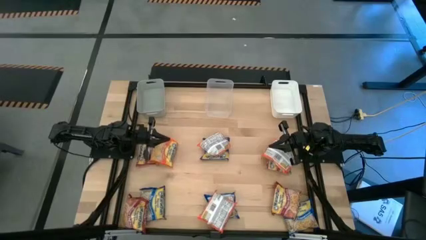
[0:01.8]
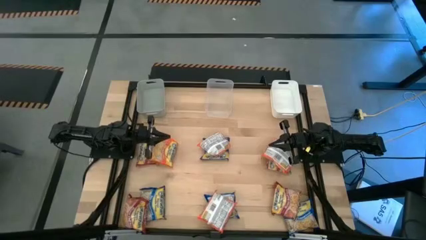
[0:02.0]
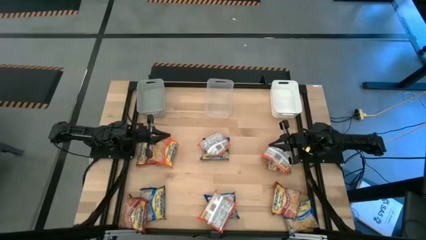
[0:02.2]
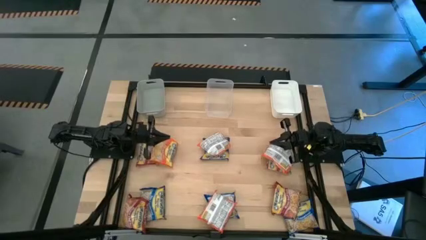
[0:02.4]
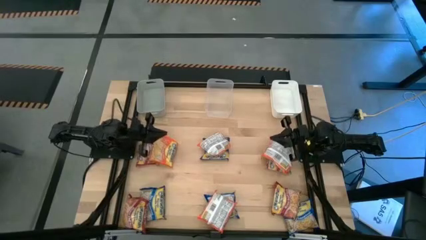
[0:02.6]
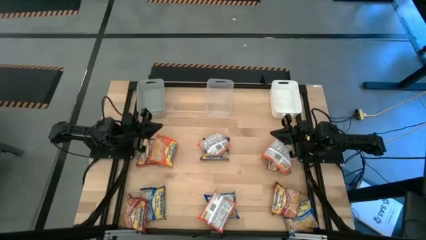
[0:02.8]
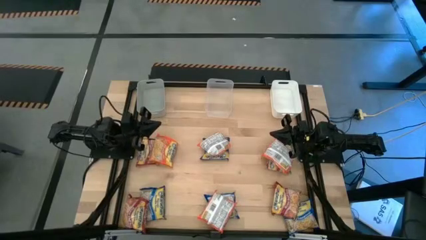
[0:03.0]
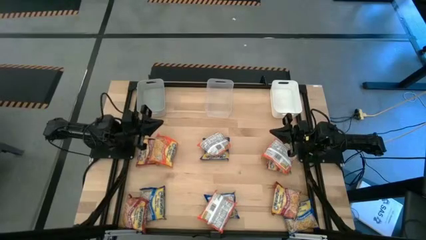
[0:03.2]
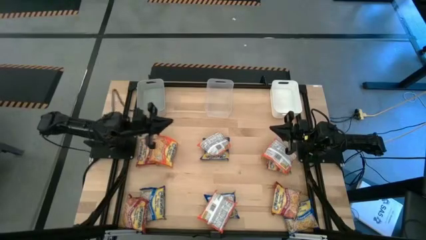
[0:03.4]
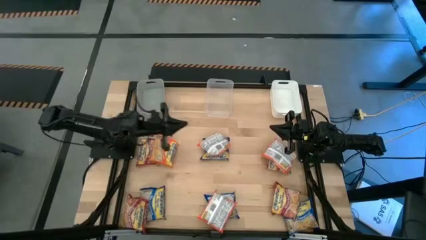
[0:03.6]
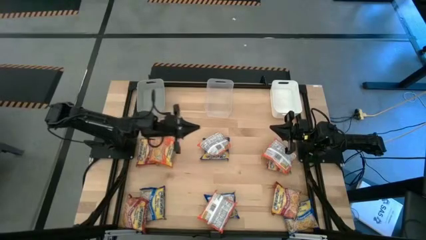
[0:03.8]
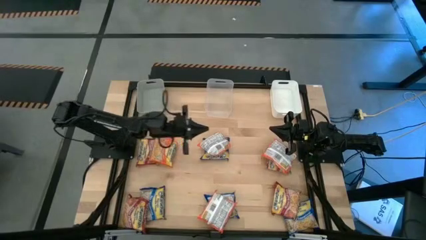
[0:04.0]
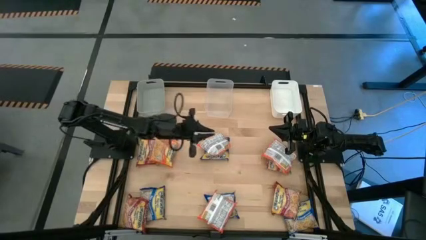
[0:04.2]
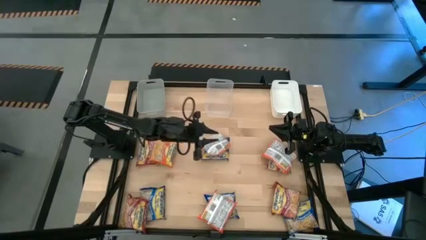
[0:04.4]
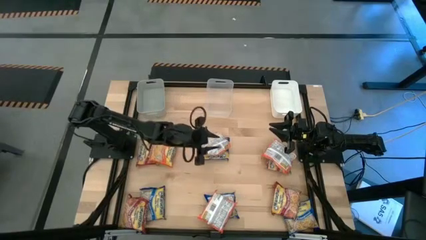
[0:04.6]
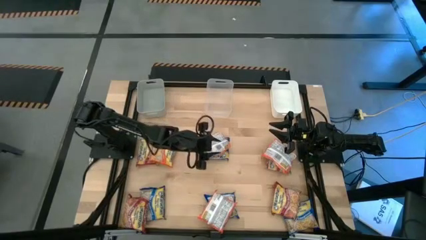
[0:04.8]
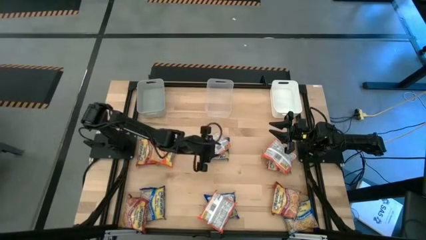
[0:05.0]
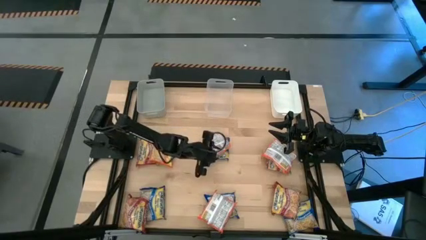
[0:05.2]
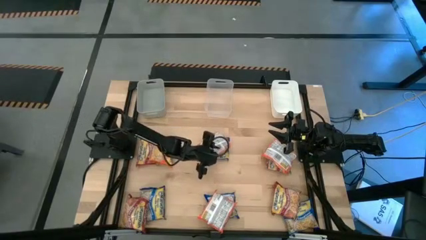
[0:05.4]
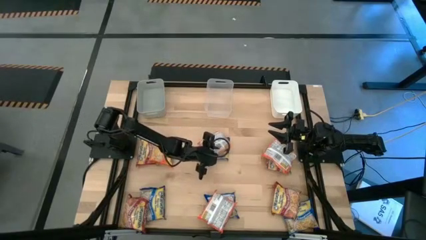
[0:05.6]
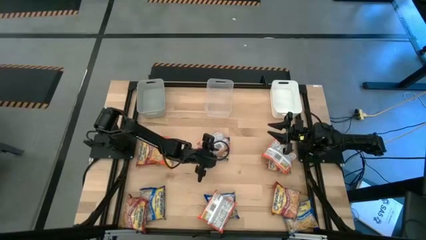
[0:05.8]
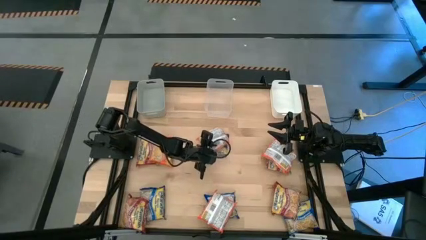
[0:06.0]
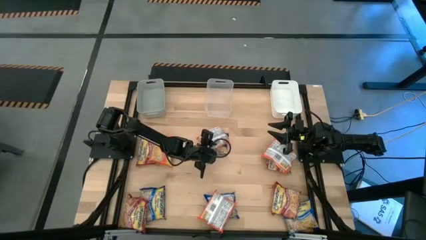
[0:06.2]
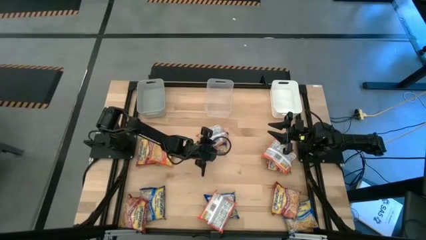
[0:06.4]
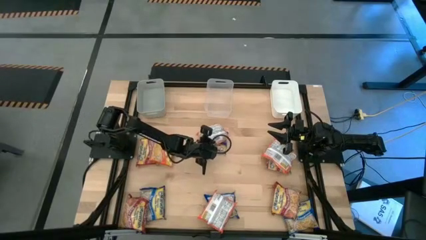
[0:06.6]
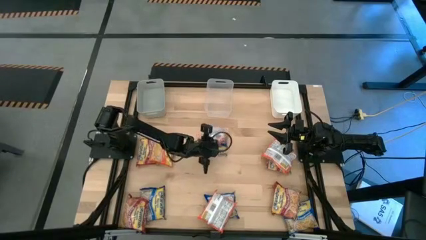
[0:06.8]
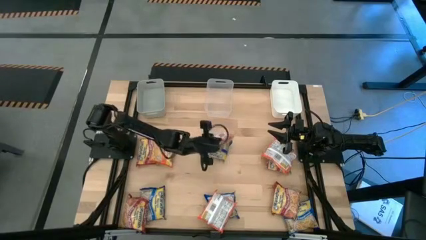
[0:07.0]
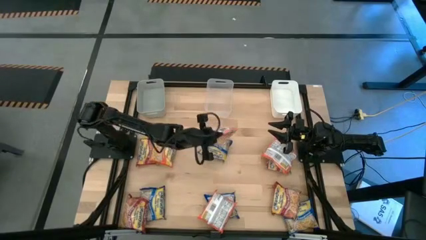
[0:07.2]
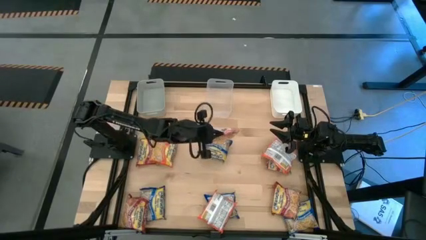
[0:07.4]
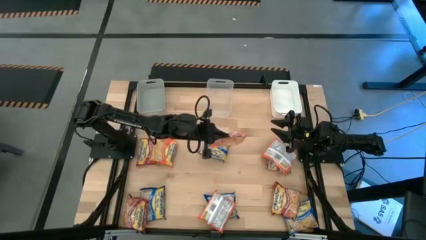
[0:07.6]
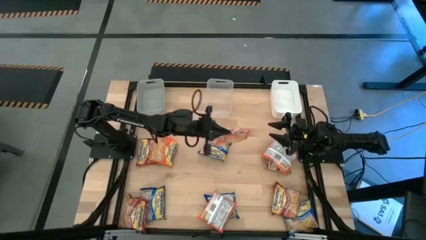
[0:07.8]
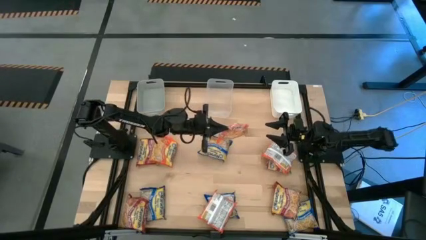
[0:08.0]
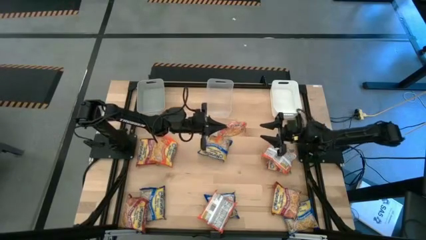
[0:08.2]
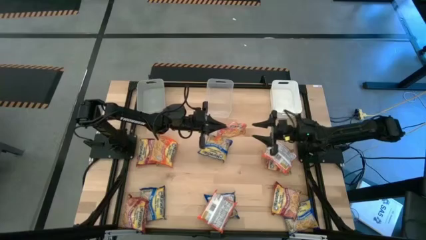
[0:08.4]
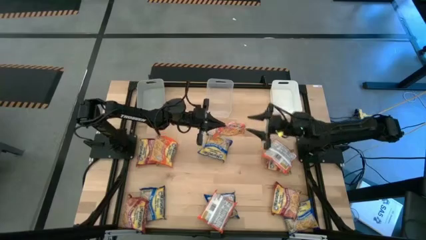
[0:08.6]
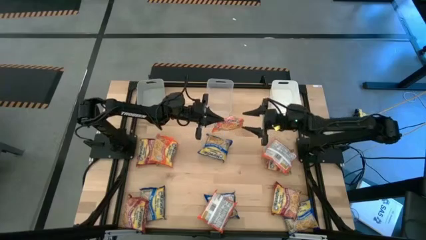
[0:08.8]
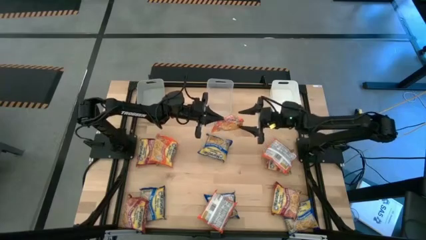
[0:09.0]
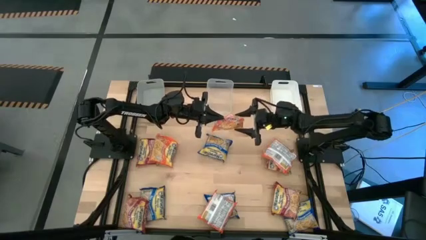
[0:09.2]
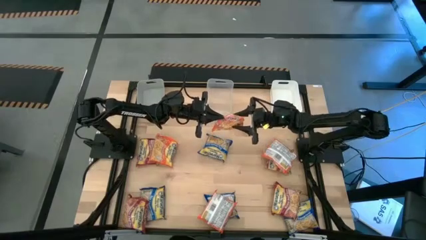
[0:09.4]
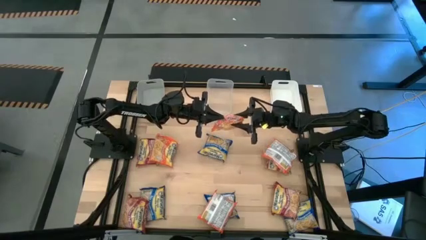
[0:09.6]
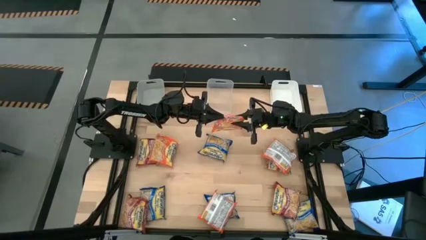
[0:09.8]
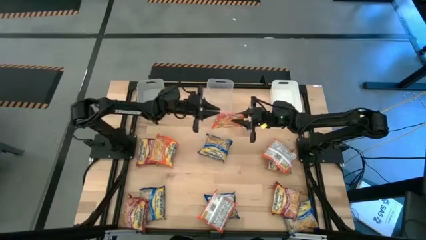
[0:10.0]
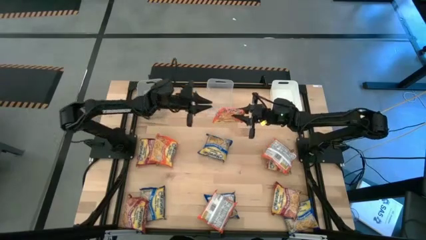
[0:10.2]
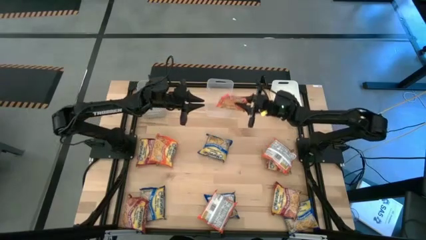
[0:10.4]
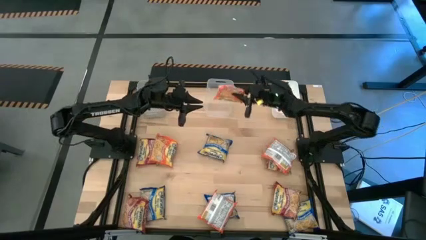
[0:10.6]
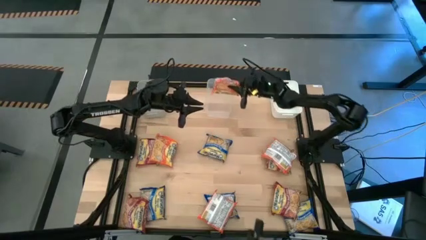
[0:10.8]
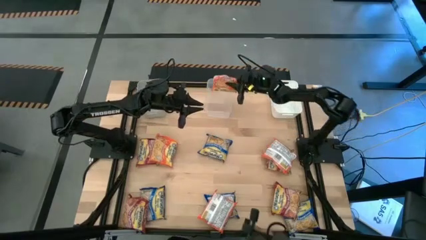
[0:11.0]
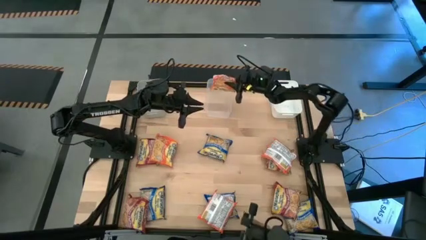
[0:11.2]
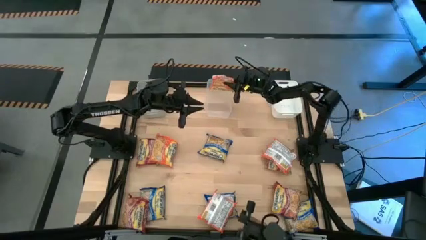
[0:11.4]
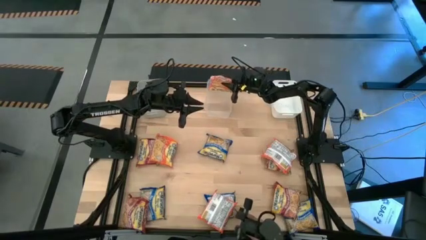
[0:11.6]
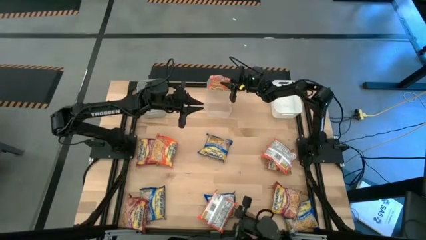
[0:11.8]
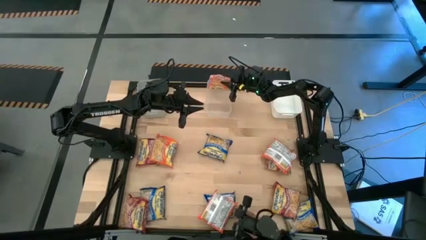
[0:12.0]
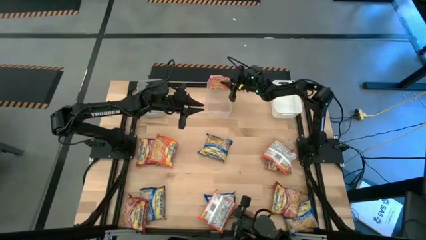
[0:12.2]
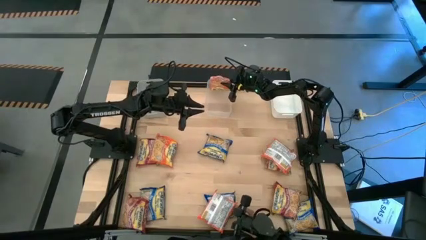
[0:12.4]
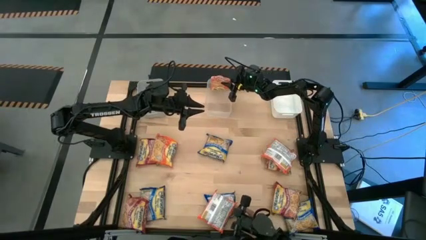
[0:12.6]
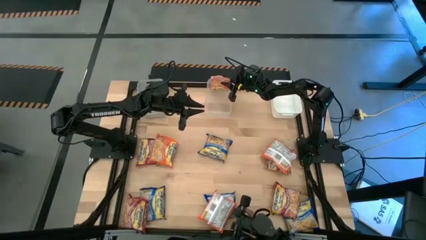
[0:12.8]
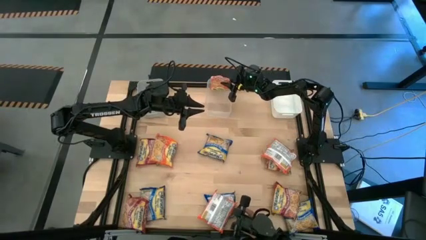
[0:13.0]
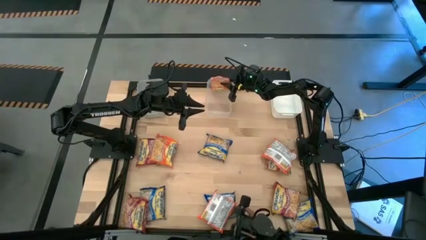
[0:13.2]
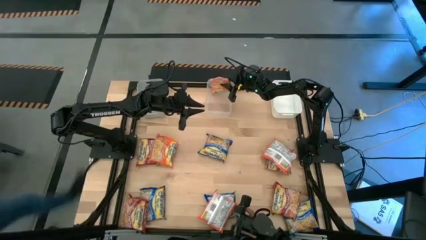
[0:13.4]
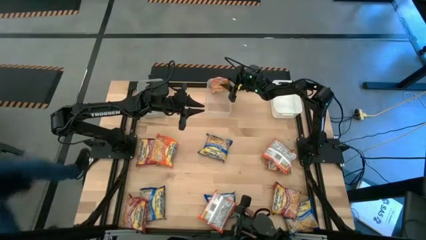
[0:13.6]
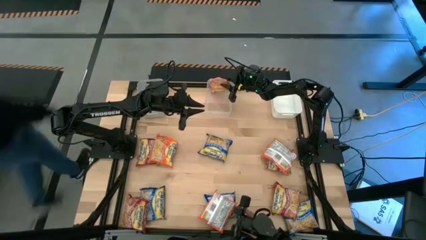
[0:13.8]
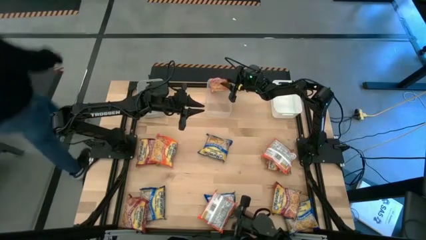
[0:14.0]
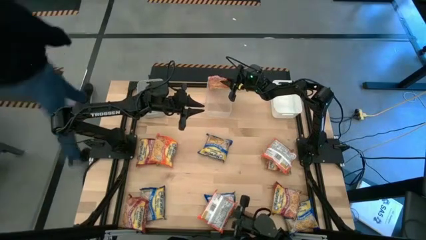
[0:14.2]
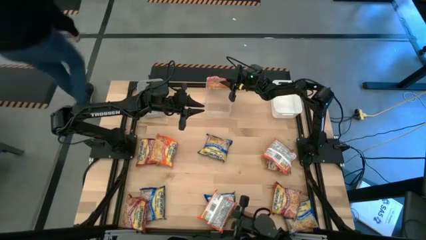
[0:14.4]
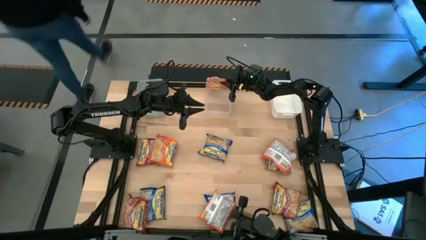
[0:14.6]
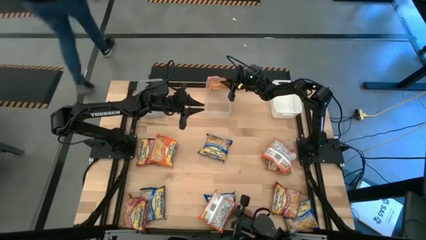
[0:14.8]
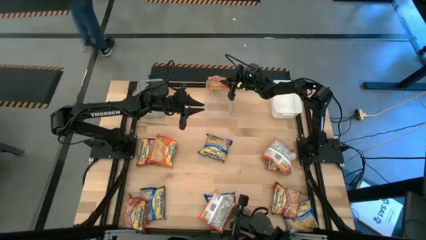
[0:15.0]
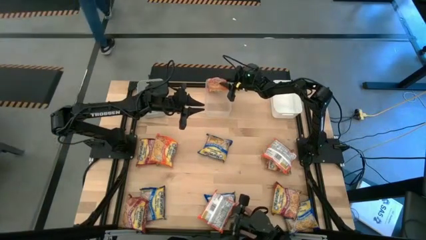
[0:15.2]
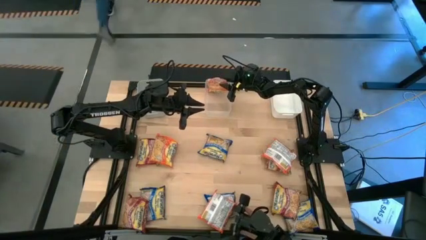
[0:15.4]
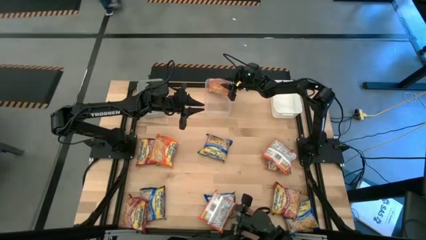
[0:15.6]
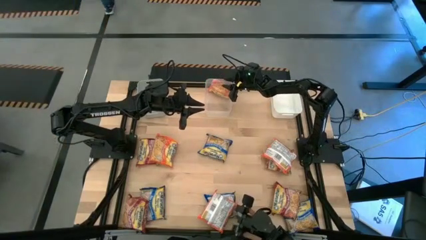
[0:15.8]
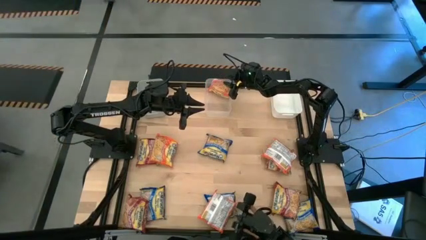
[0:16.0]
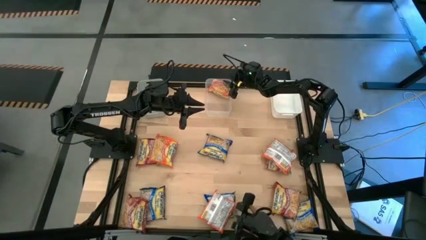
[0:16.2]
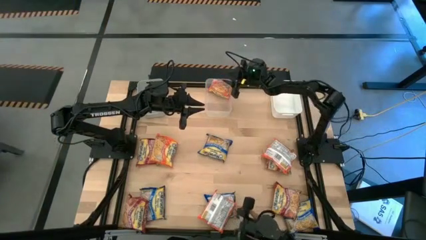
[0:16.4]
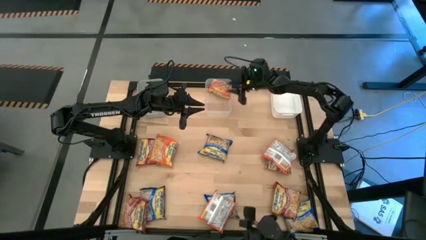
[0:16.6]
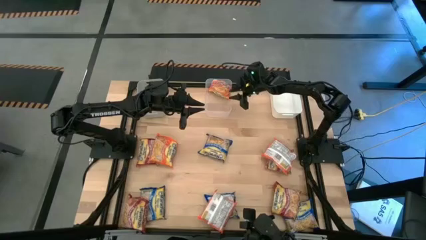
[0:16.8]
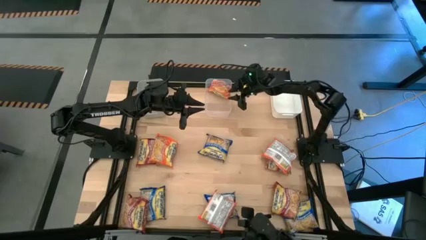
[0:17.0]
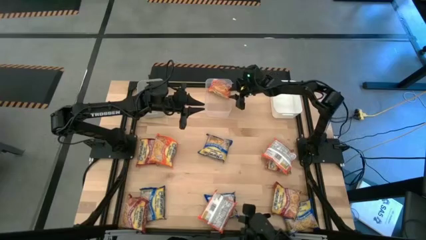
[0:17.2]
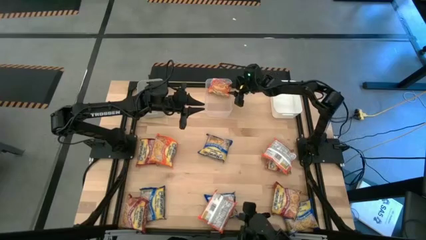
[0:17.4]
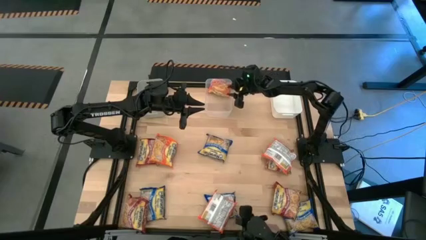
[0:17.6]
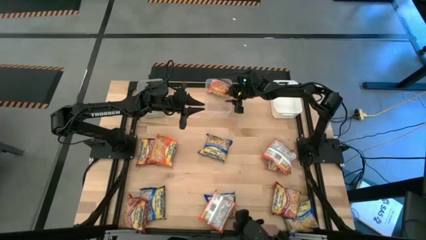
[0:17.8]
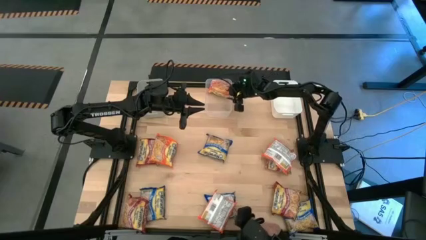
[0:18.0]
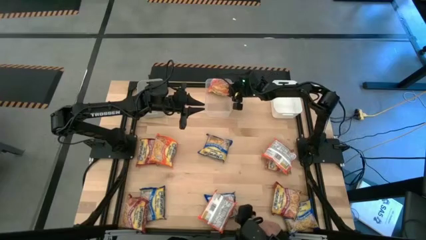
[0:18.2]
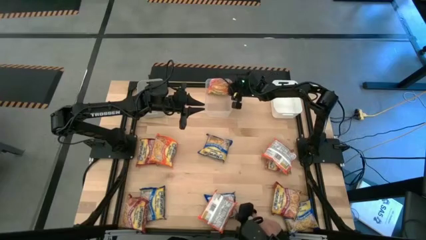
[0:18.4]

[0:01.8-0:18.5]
Task: Sort Maruchan noodles
Put the top center orange noodle into the transparent bin
